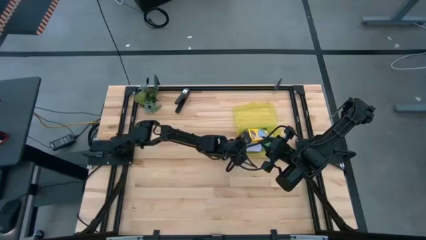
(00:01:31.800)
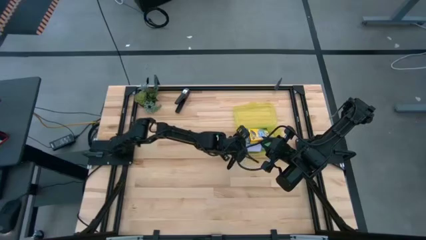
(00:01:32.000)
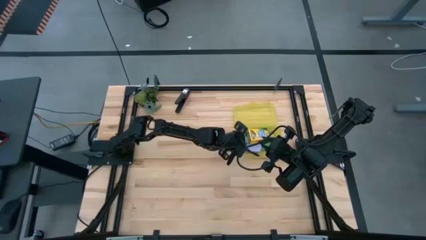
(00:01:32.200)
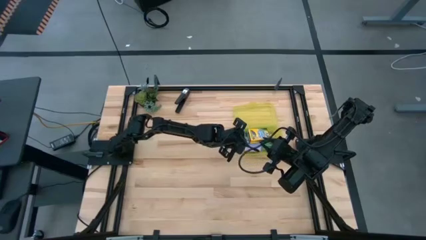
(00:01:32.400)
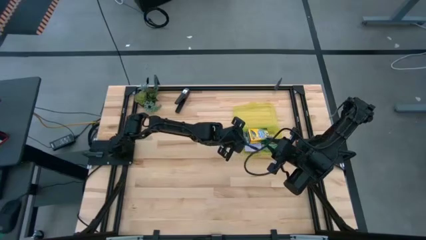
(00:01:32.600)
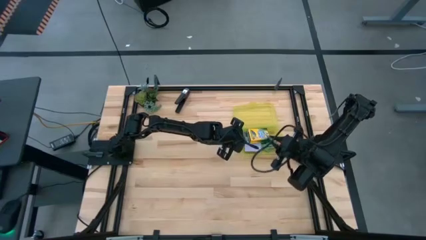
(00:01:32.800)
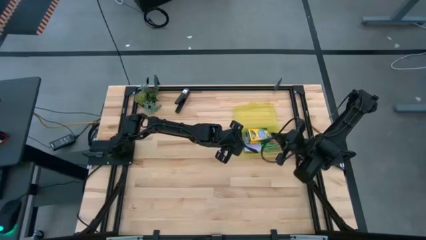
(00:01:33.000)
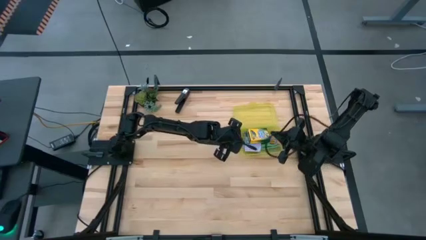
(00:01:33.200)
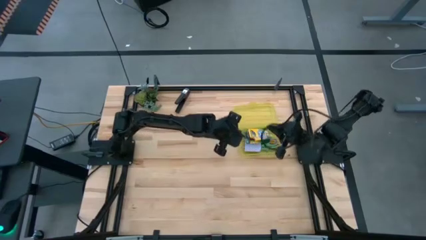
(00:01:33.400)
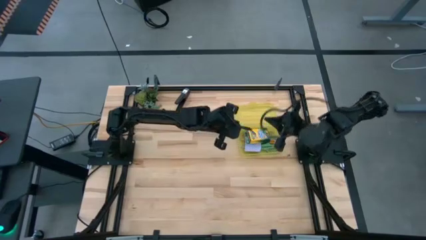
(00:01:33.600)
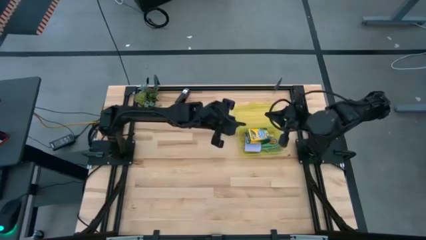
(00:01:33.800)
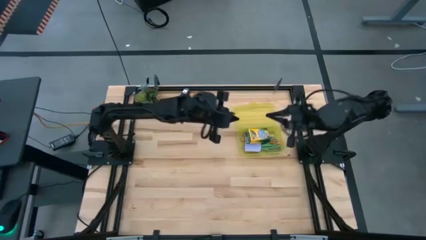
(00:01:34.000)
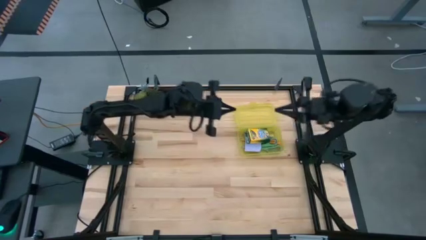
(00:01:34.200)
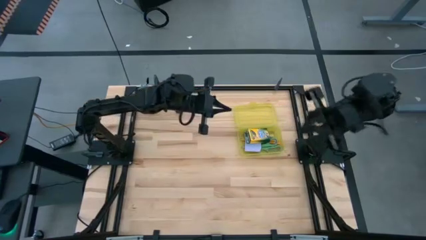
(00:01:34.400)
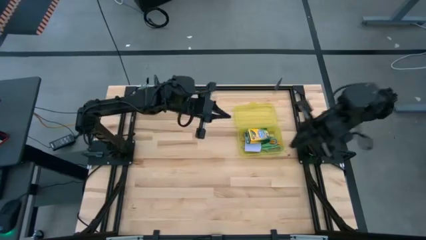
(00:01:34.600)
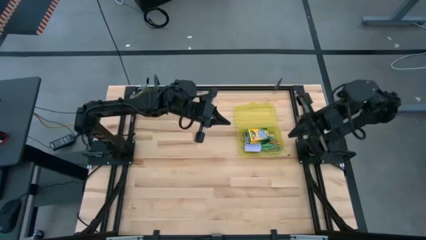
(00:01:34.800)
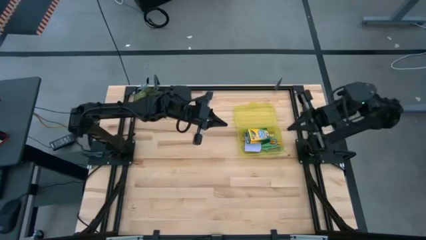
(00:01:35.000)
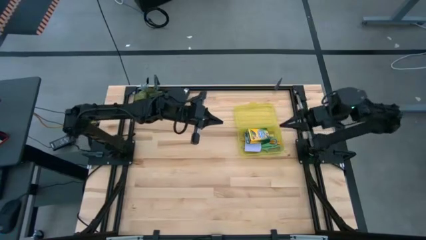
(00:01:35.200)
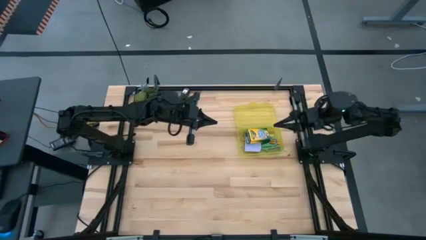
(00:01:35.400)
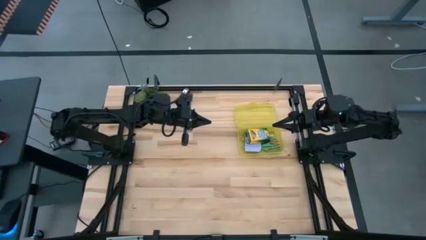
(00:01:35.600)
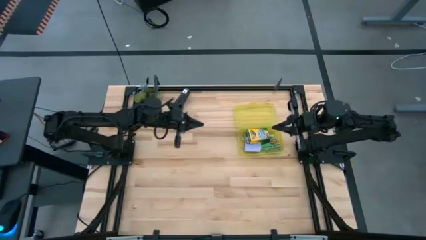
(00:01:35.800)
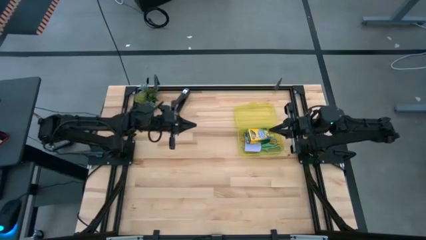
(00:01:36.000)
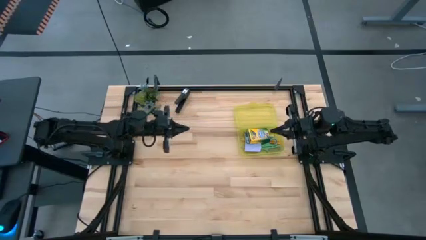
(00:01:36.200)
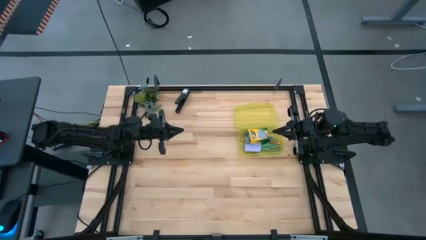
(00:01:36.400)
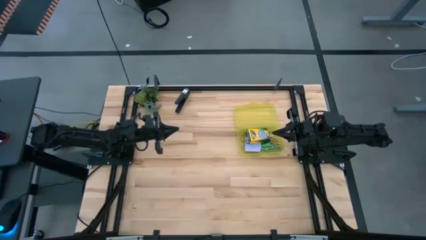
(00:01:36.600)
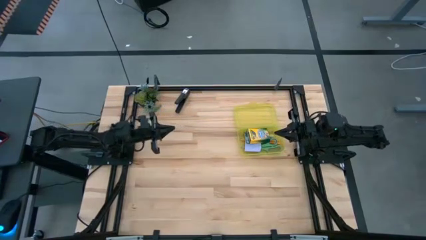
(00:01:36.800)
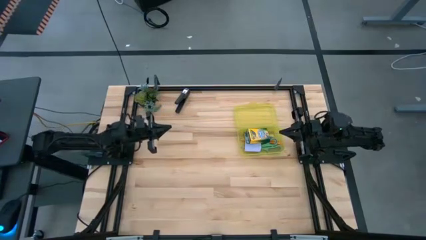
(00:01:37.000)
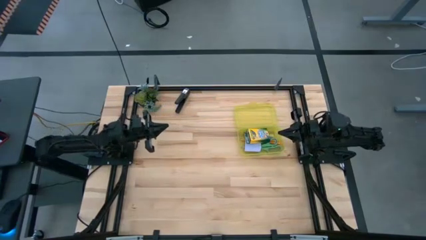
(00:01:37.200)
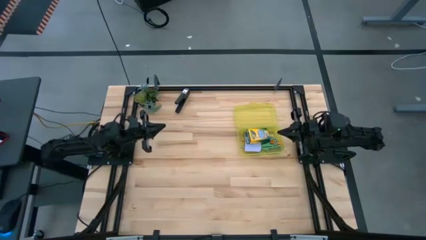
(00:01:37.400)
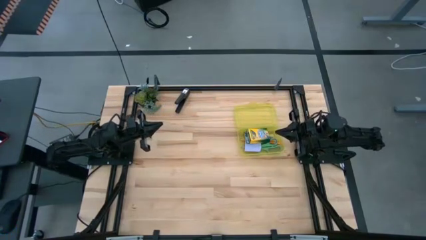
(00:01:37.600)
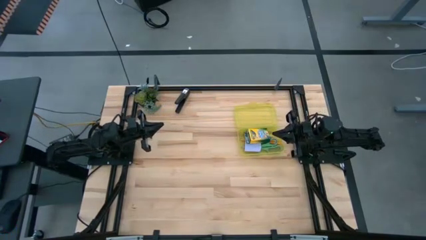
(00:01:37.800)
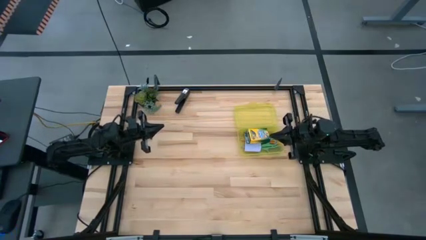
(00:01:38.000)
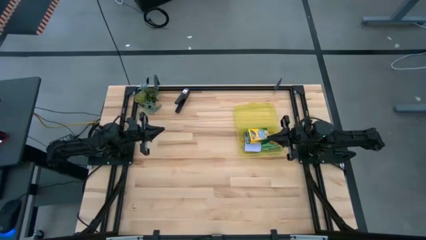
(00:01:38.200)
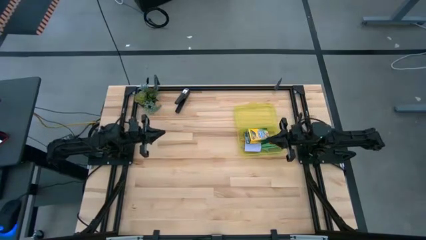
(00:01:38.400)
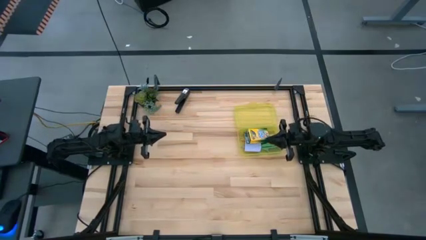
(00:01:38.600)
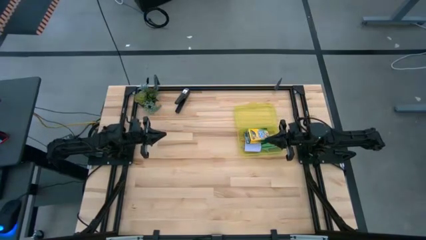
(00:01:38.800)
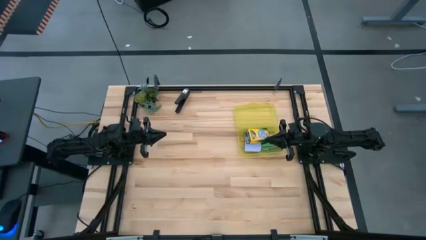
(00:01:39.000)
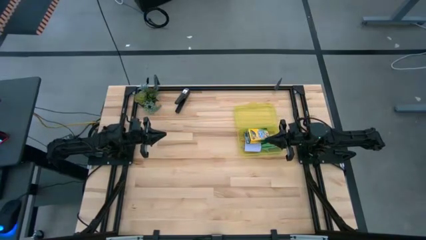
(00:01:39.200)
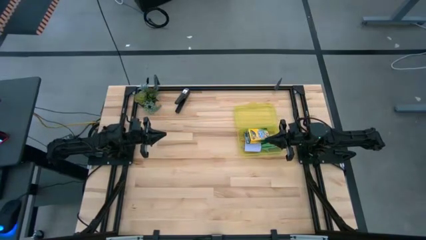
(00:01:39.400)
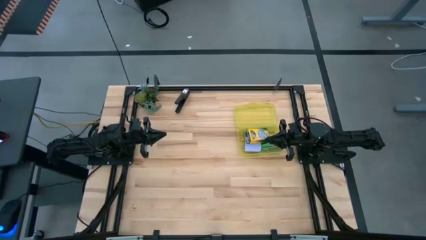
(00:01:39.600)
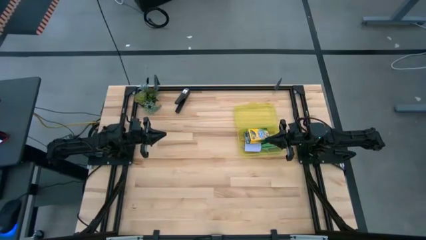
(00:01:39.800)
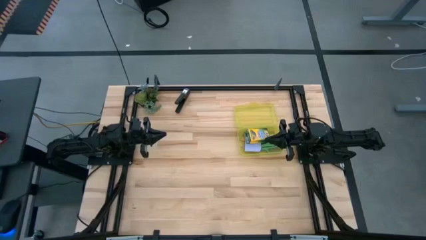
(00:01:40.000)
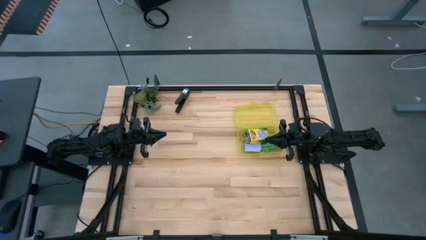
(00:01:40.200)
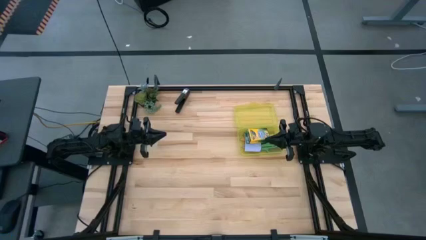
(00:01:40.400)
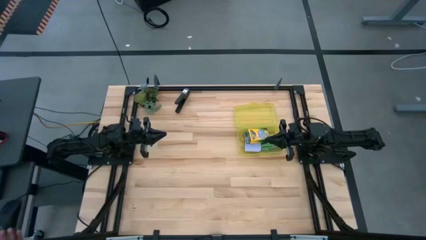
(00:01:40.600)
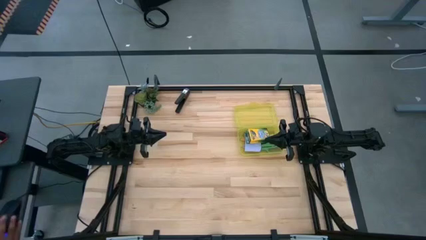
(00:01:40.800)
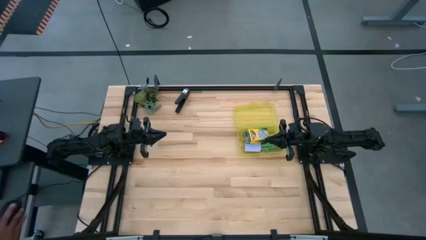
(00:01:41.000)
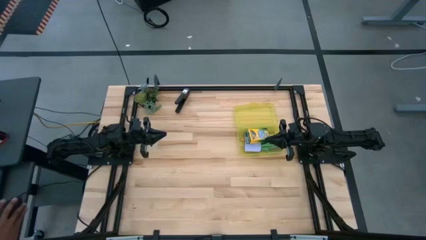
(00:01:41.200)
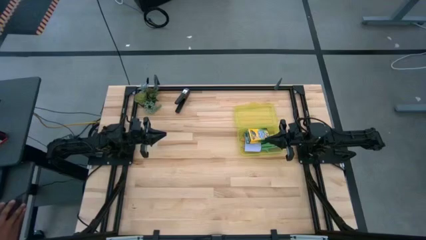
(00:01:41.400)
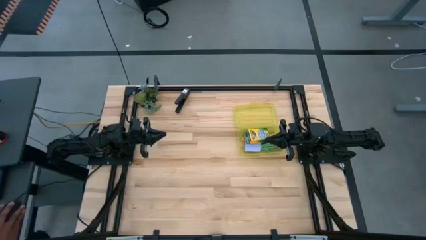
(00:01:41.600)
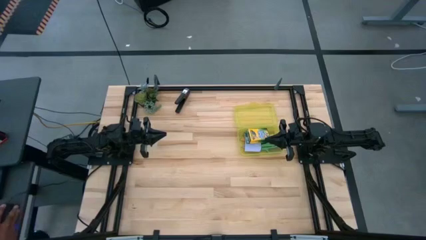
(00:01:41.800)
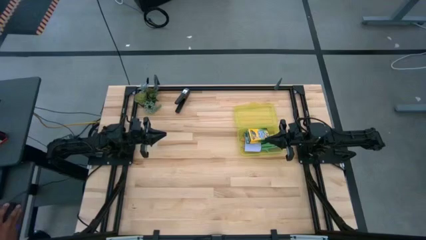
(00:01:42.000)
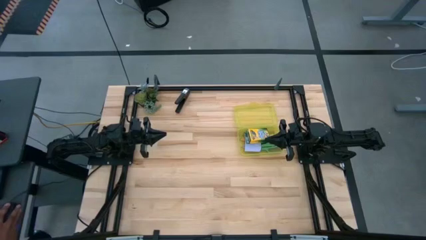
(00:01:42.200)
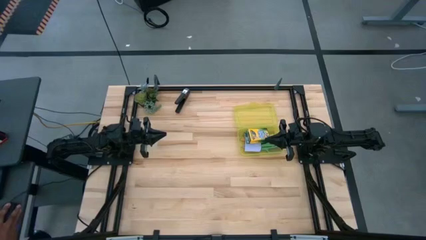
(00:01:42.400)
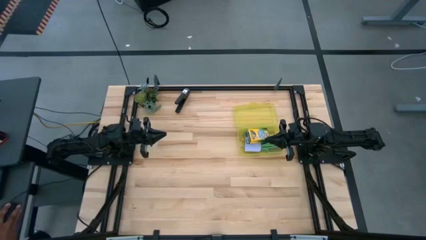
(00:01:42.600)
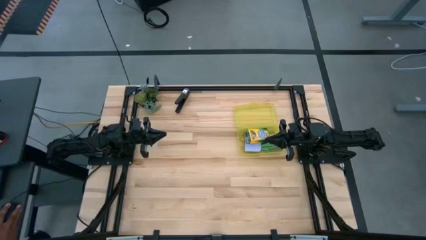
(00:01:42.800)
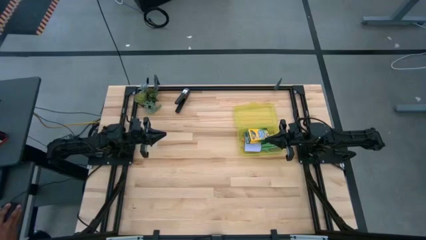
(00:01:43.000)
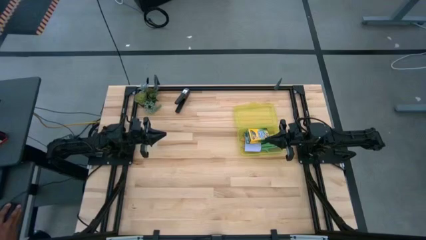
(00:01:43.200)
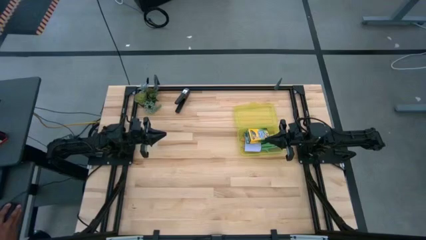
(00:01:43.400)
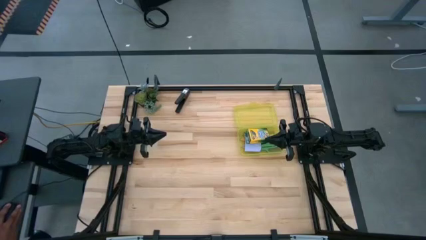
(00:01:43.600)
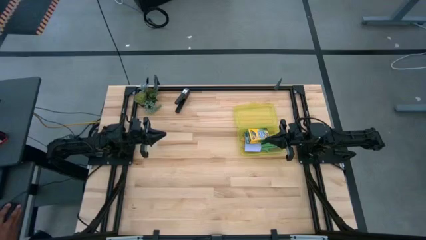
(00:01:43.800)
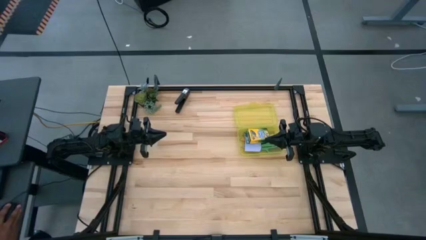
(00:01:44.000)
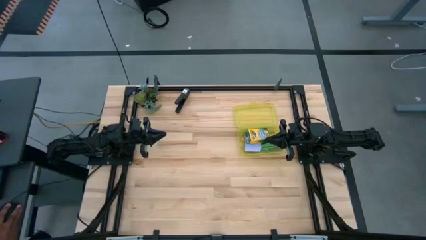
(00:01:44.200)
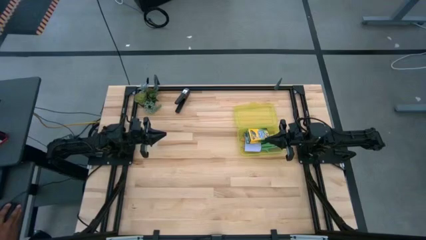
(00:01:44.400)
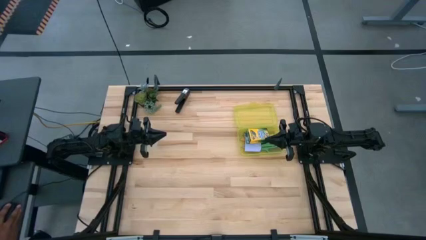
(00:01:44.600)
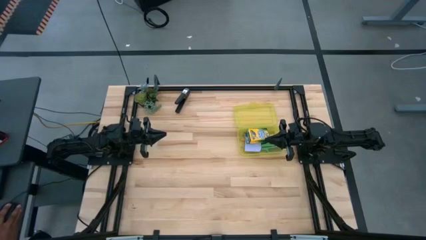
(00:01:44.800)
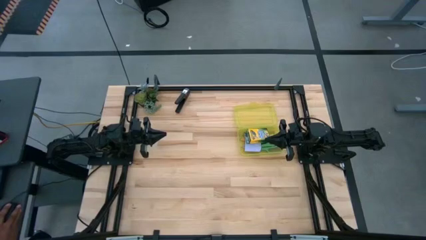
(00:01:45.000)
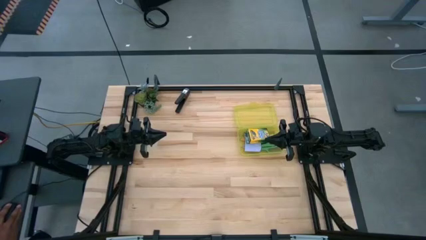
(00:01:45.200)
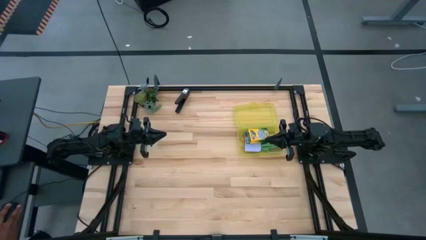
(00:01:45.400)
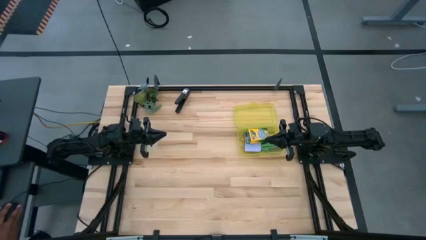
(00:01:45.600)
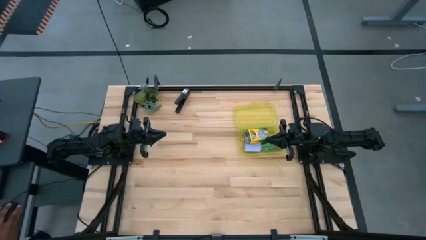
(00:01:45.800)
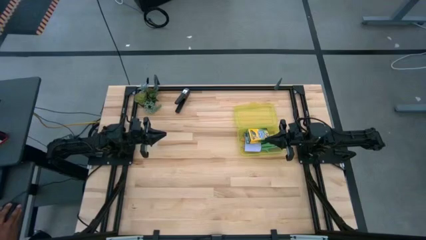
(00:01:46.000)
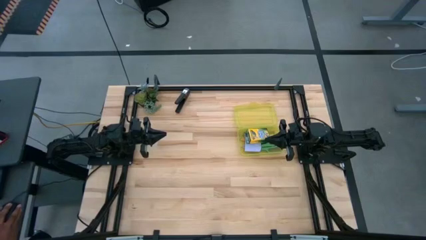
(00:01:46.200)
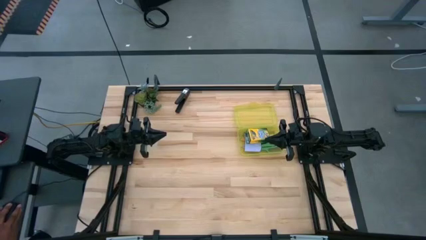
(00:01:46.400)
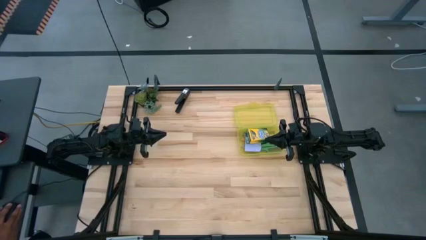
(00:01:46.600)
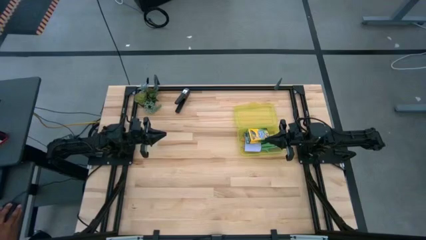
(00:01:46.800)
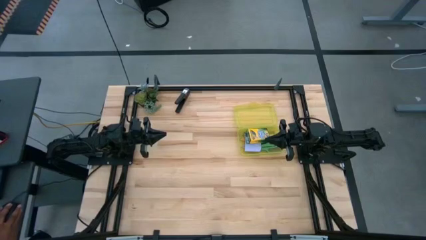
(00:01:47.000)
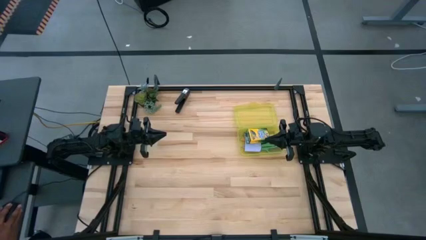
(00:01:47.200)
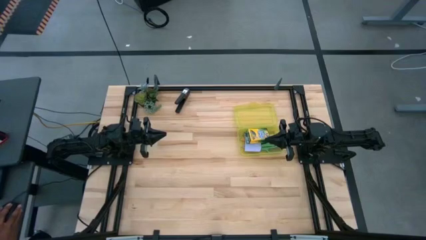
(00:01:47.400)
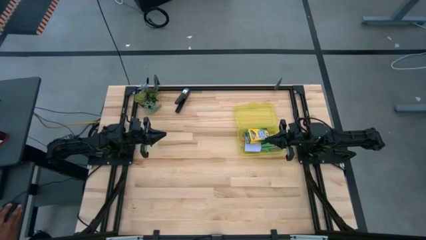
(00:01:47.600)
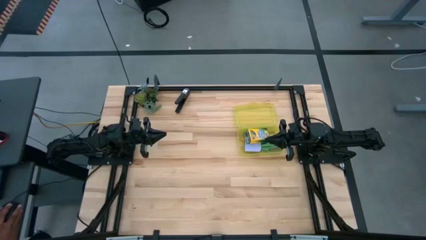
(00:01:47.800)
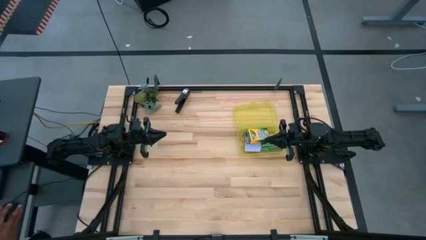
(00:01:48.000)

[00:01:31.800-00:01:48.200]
Task: Pack school essentials
Return to Home Position
